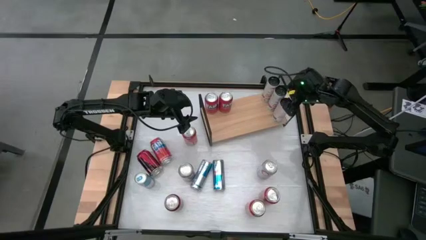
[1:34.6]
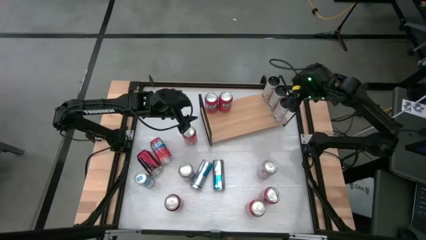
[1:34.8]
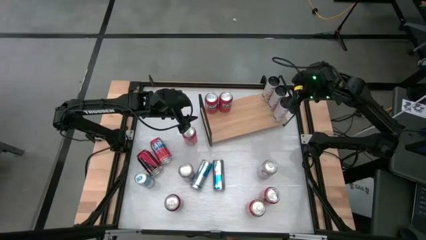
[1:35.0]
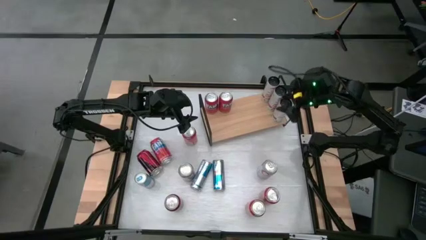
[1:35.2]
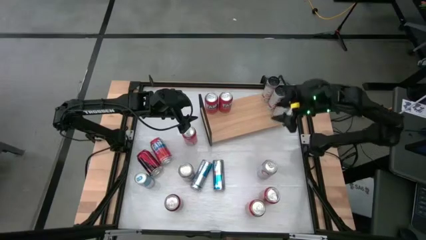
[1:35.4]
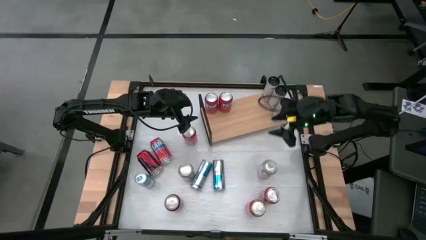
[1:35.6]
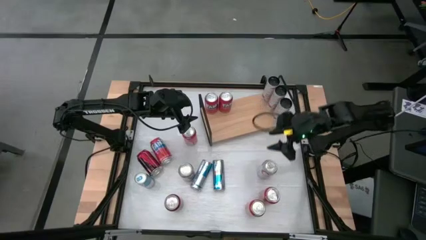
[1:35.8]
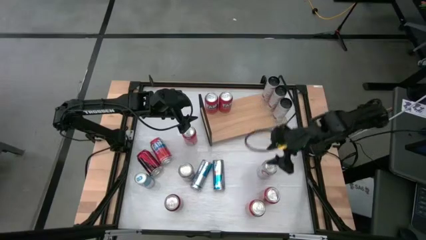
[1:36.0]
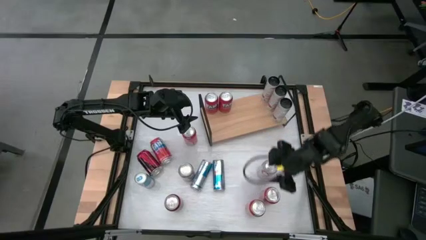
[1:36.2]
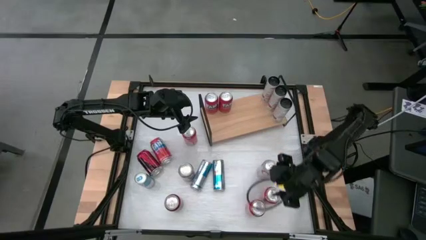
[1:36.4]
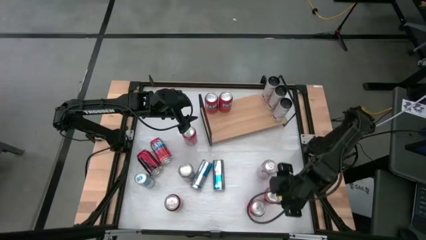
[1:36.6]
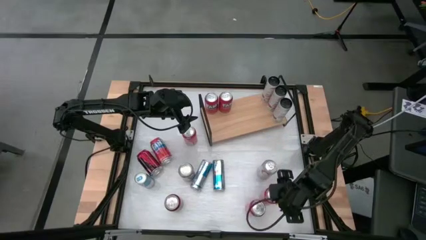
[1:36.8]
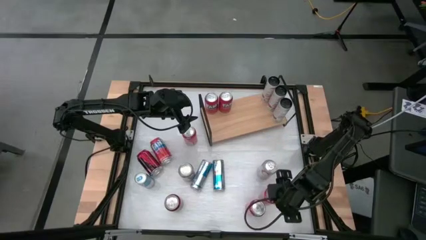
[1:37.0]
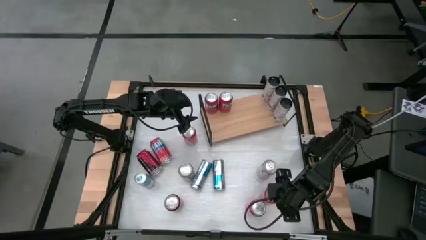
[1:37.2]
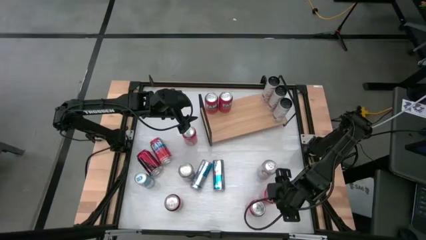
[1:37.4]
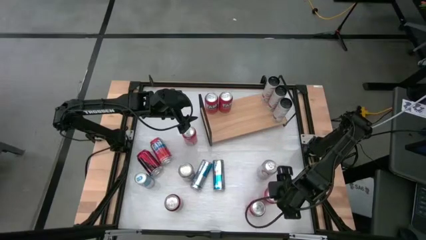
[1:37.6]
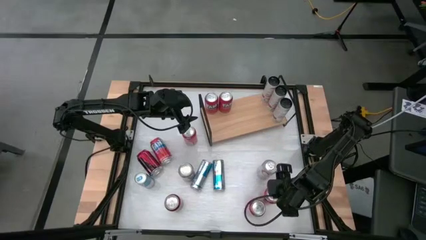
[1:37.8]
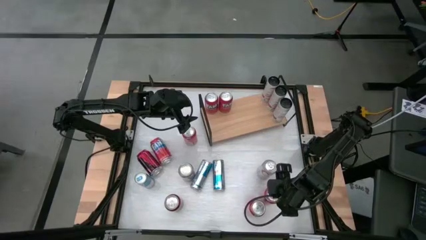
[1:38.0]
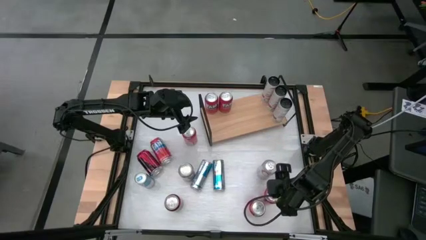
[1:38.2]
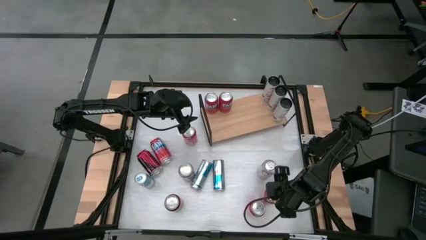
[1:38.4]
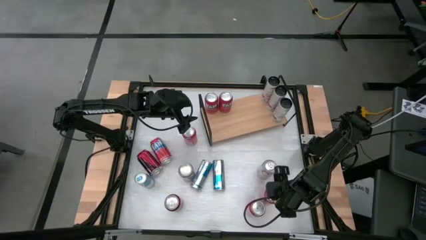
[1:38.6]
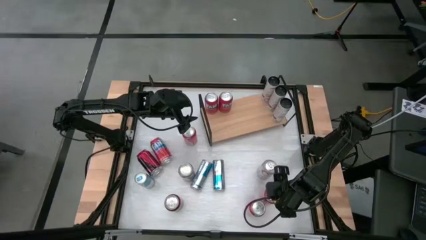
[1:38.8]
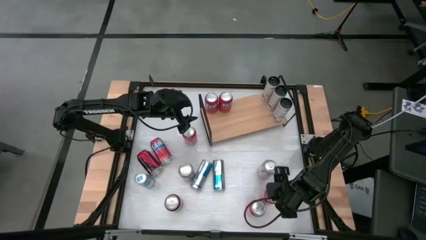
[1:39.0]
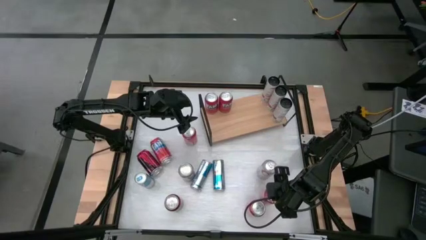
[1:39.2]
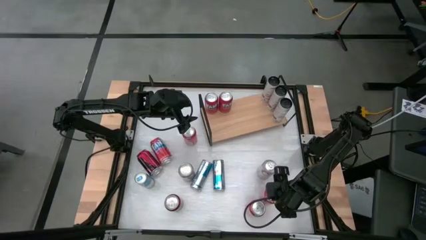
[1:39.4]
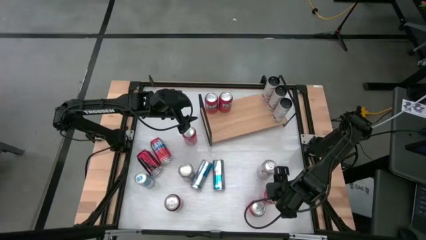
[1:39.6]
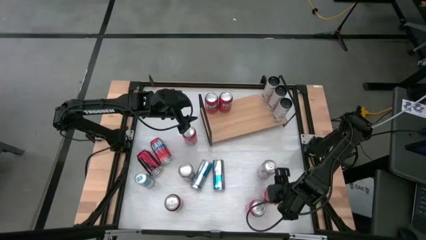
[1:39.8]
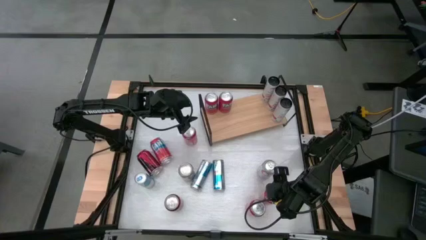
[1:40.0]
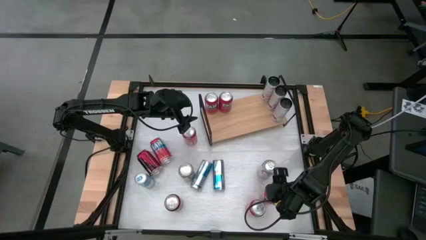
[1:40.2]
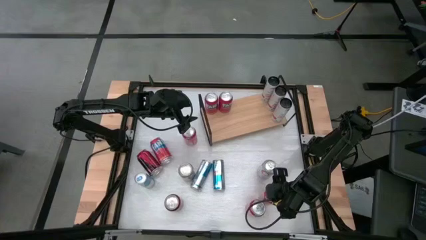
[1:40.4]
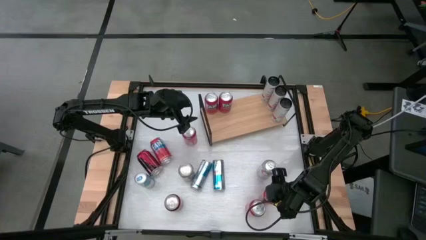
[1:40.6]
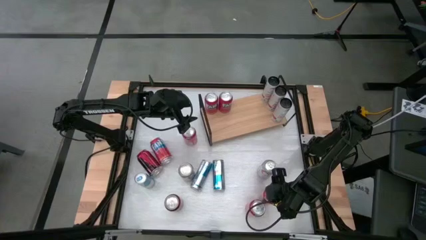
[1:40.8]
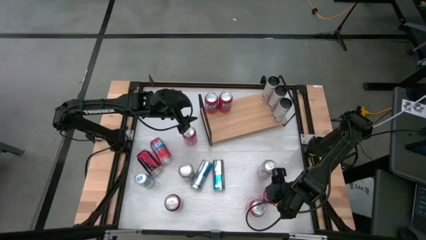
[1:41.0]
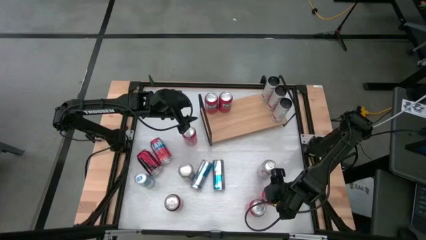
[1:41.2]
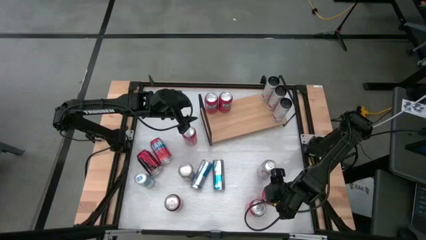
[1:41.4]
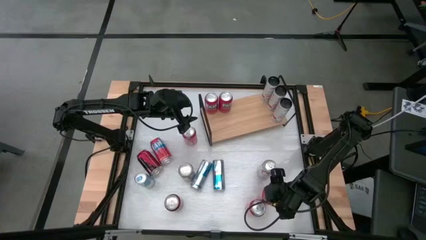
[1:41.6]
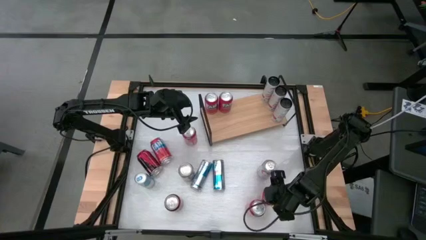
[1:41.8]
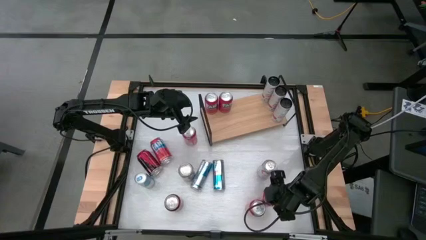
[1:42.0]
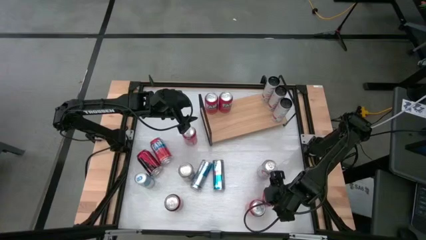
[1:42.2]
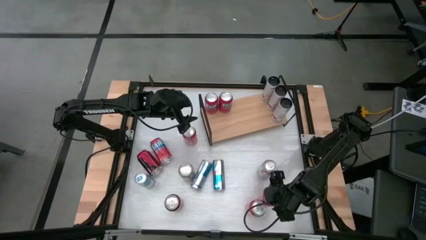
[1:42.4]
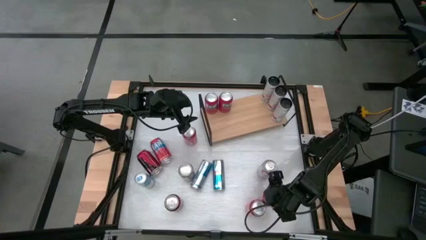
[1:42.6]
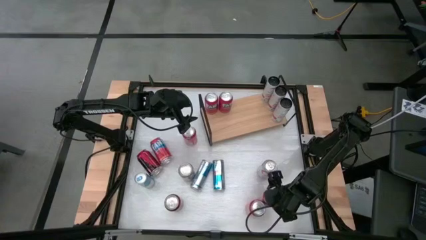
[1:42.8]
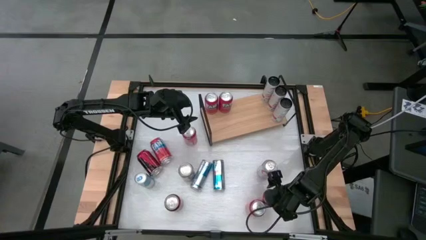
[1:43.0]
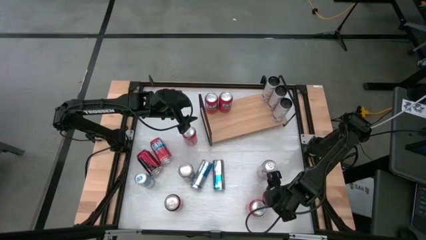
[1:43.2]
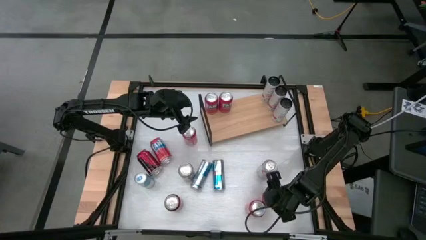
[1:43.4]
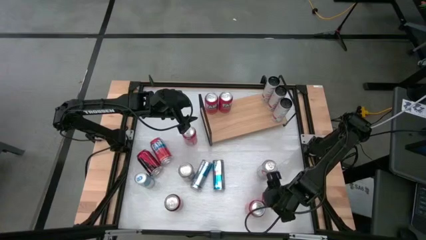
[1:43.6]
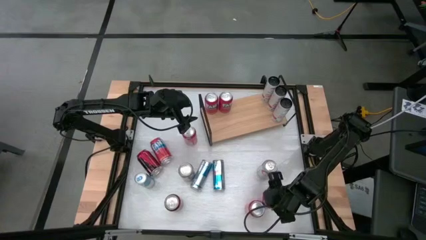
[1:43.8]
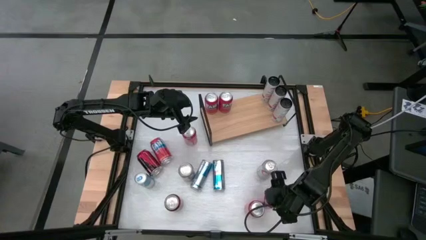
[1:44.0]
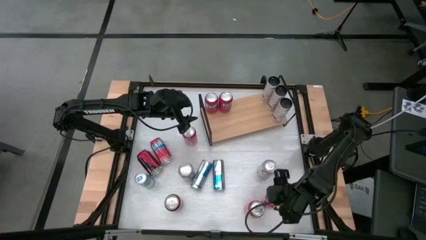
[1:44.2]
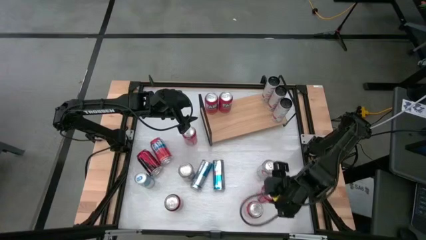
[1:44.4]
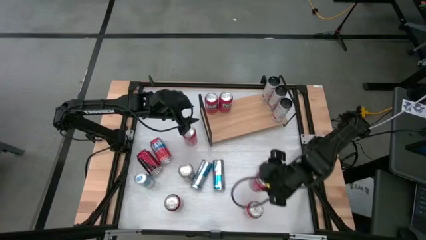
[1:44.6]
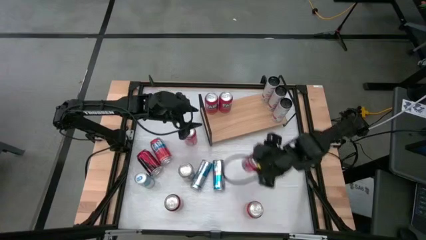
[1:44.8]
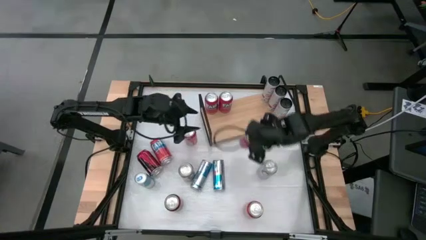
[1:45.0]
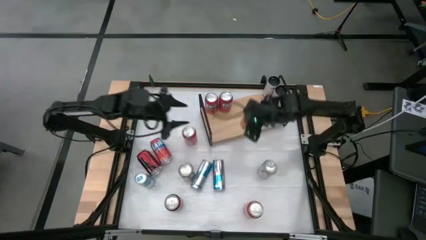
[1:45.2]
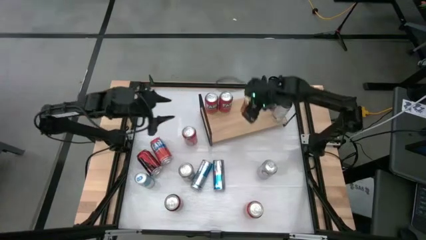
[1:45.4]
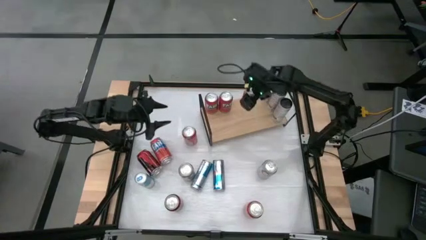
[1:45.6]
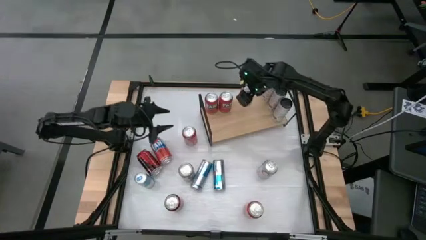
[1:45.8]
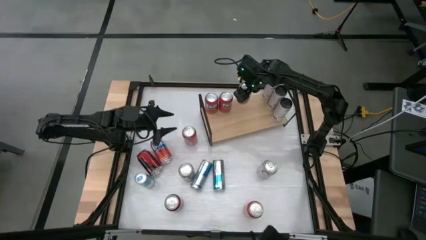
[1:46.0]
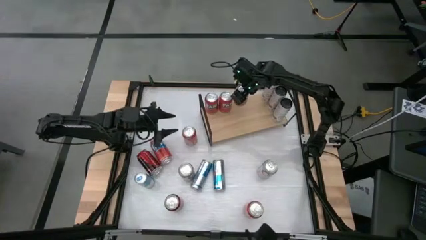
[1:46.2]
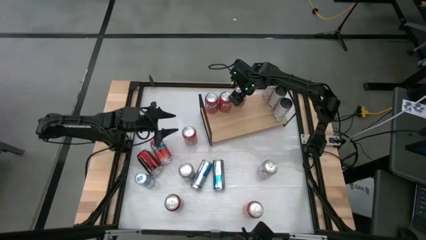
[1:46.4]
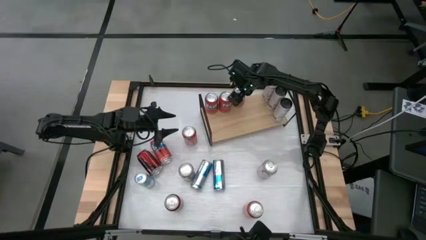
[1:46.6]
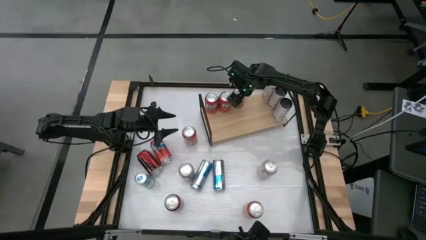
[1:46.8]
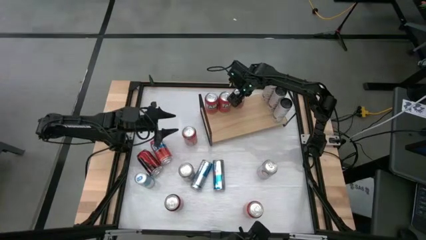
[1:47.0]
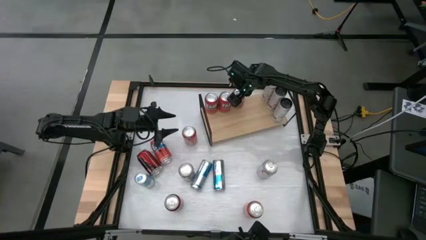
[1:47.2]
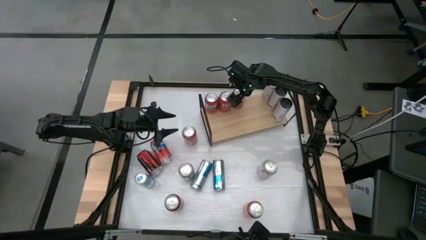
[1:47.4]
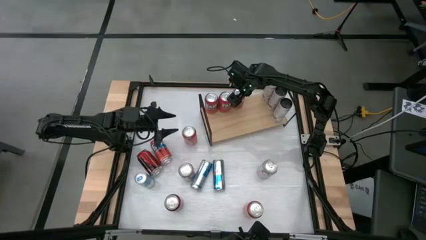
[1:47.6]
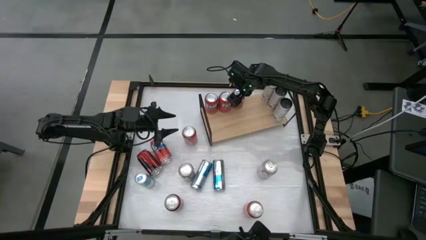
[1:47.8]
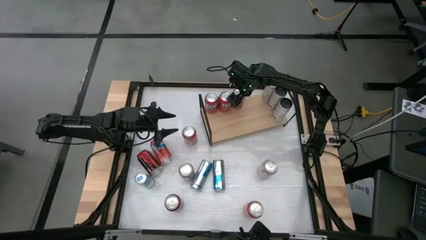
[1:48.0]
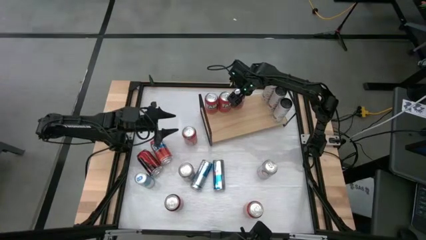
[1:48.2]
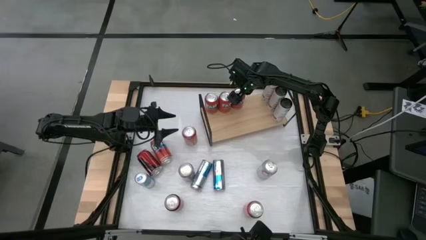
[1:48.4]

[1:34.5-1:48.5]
Task: Place canned beverage on shelf
Put the bottom right orange soda can on the shelf
